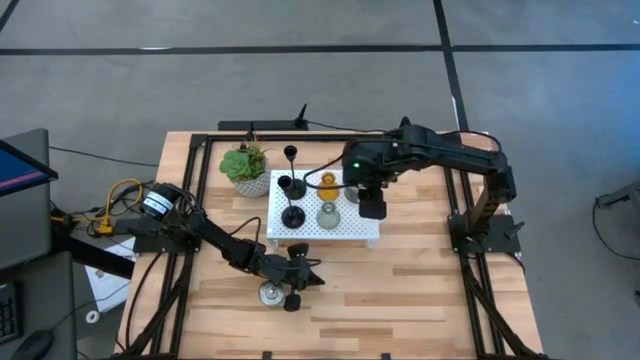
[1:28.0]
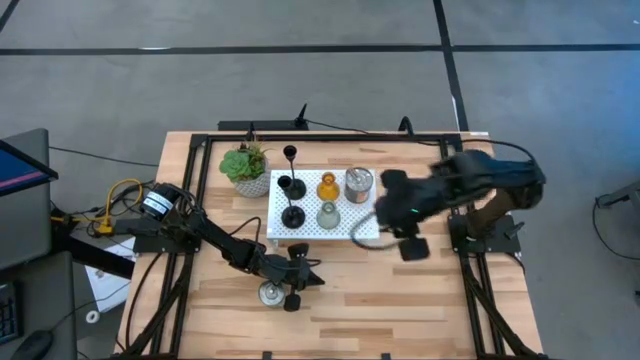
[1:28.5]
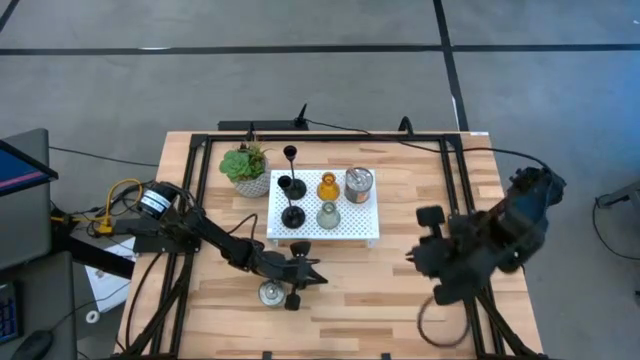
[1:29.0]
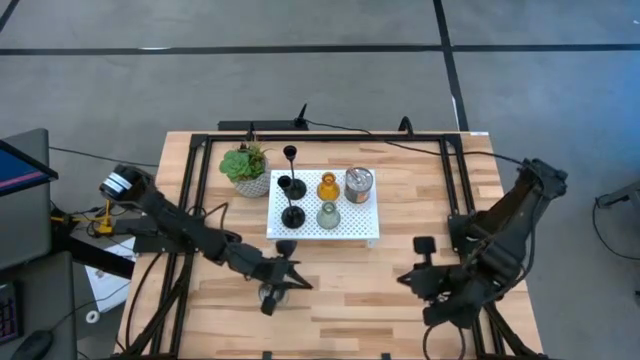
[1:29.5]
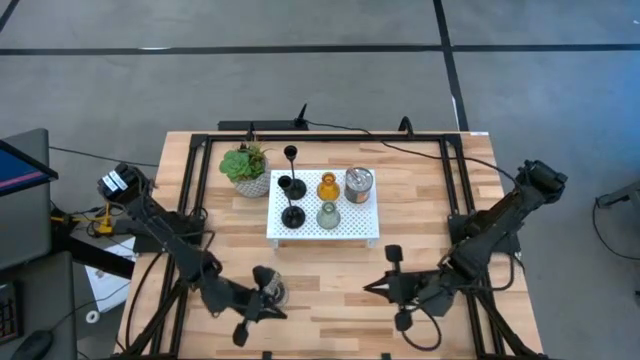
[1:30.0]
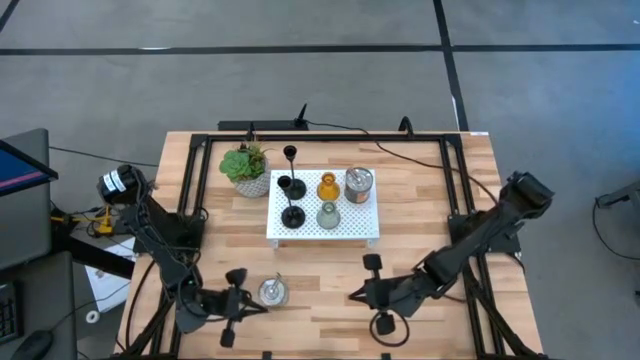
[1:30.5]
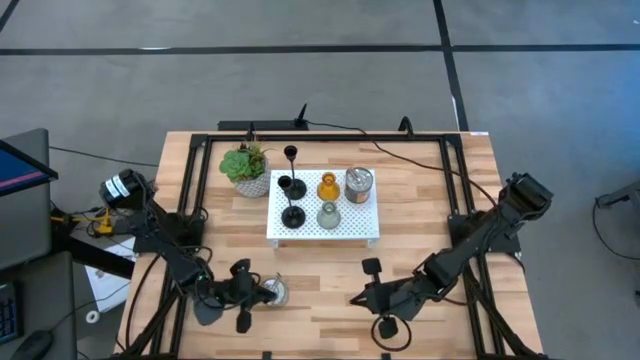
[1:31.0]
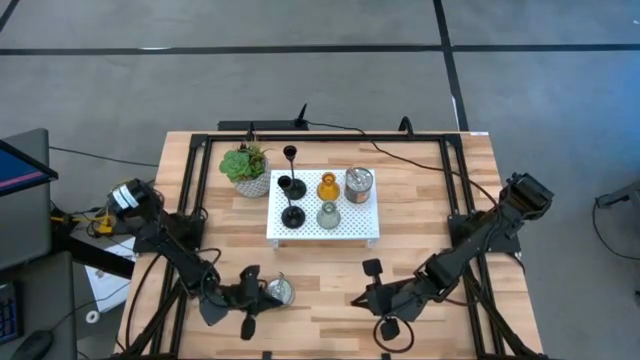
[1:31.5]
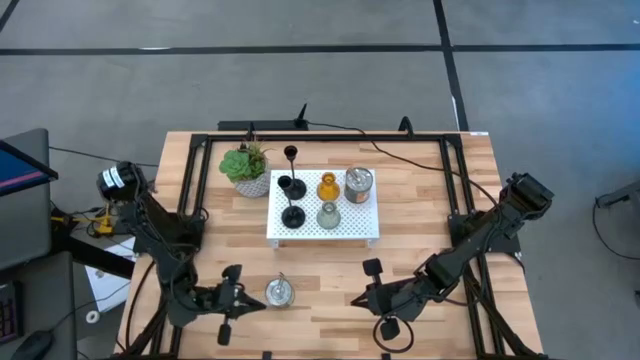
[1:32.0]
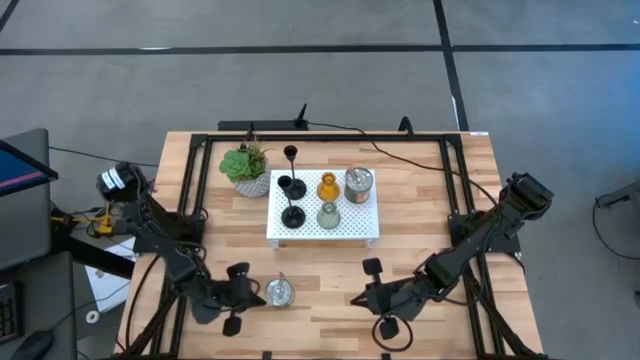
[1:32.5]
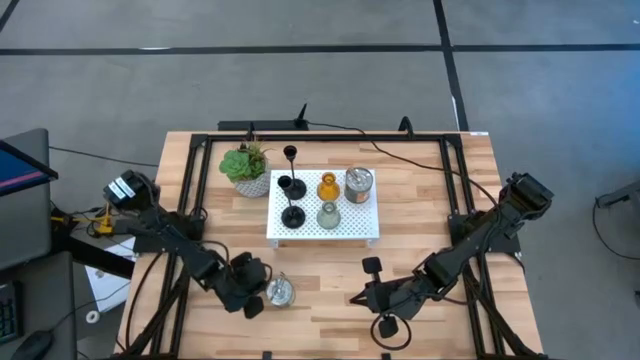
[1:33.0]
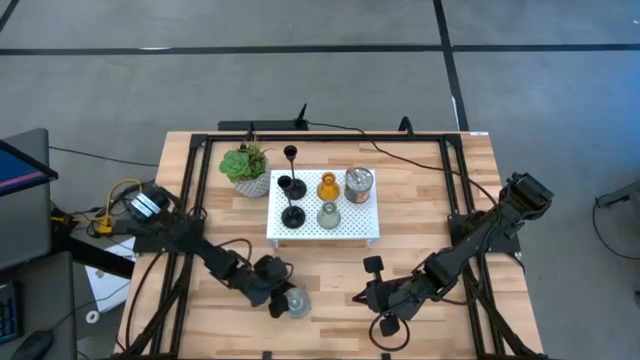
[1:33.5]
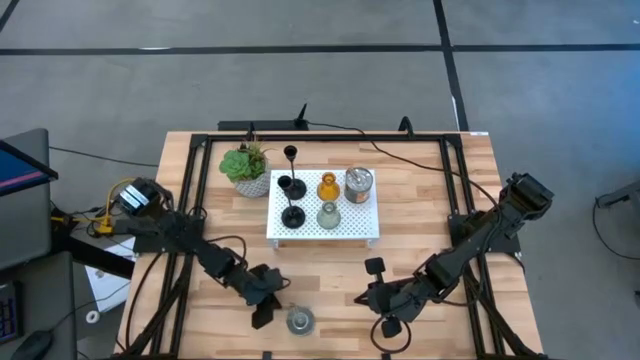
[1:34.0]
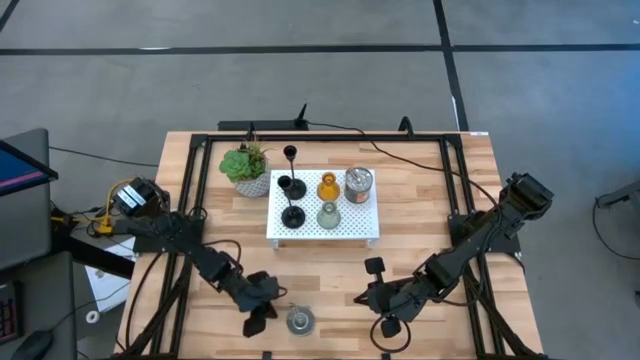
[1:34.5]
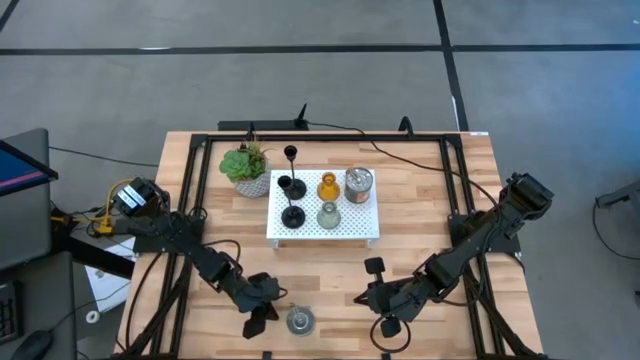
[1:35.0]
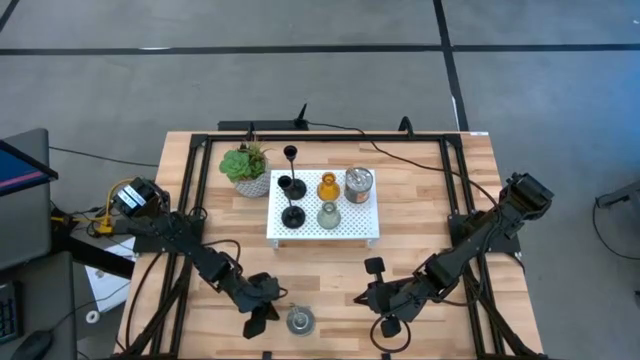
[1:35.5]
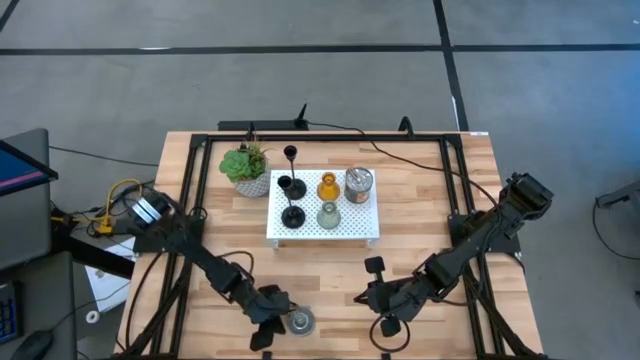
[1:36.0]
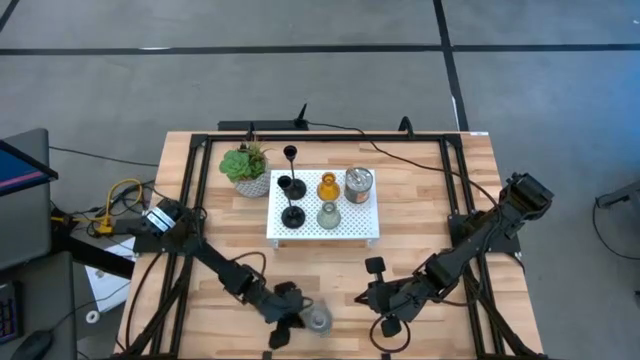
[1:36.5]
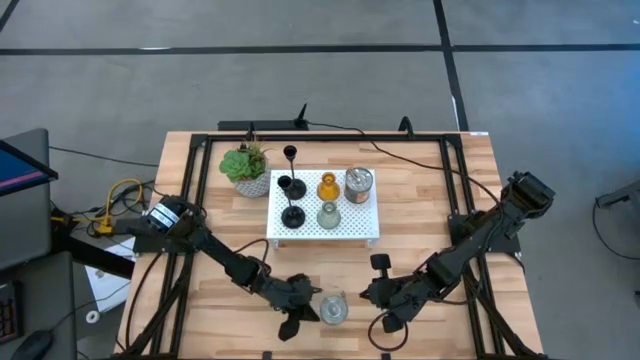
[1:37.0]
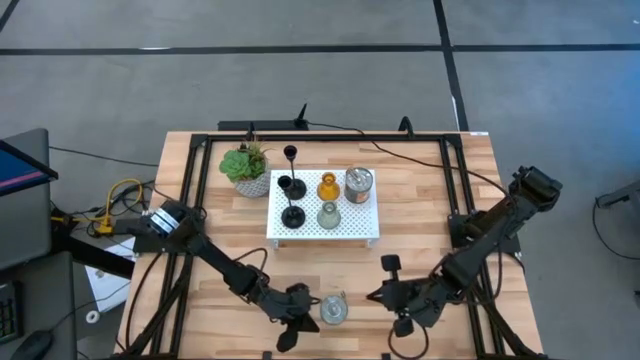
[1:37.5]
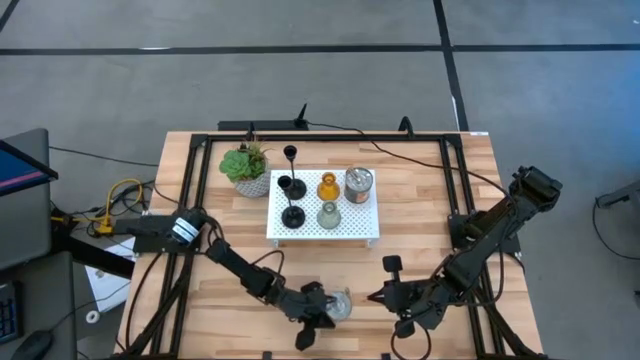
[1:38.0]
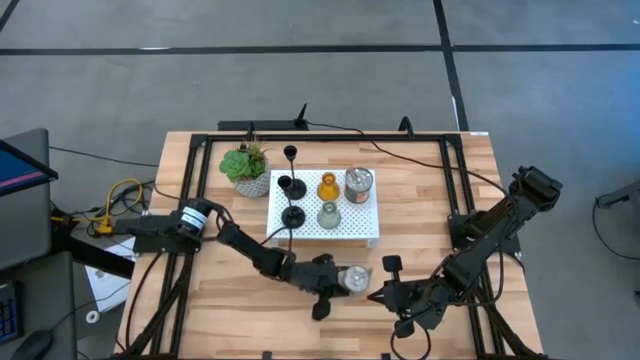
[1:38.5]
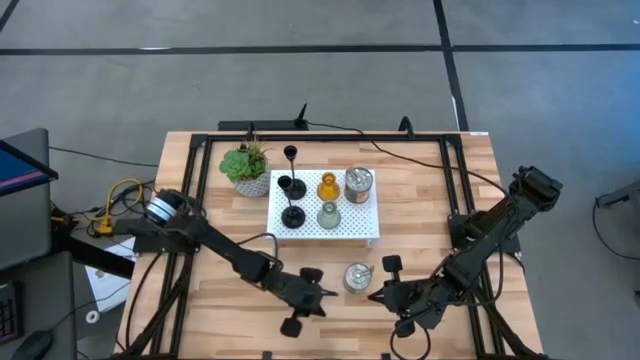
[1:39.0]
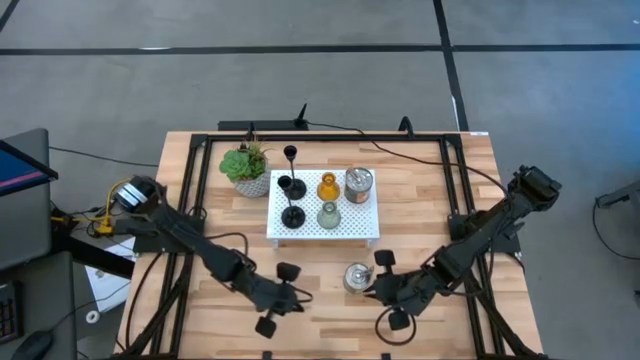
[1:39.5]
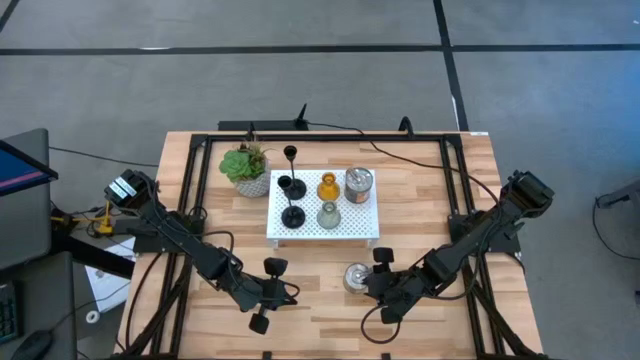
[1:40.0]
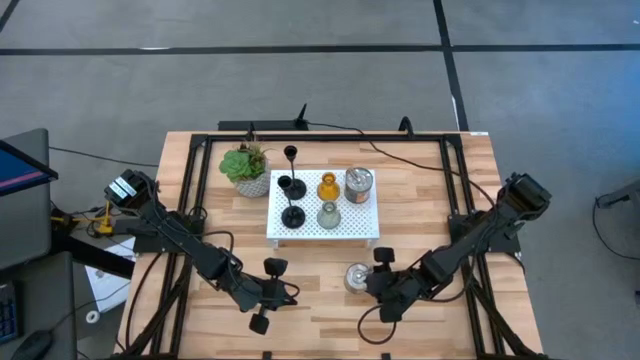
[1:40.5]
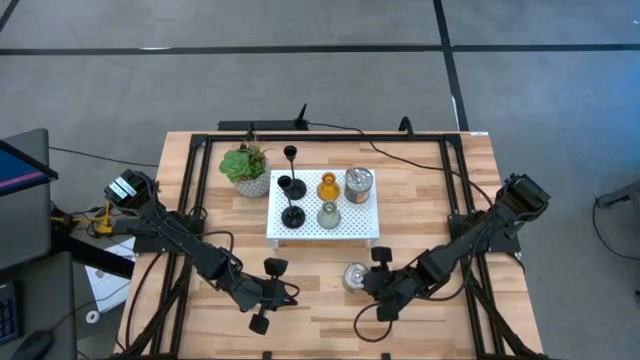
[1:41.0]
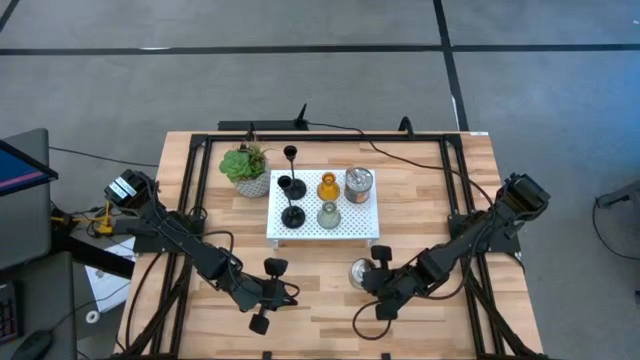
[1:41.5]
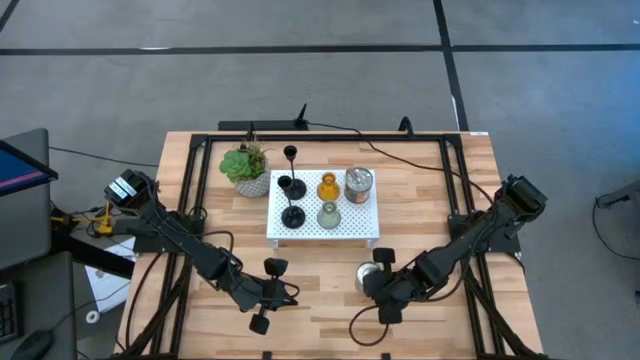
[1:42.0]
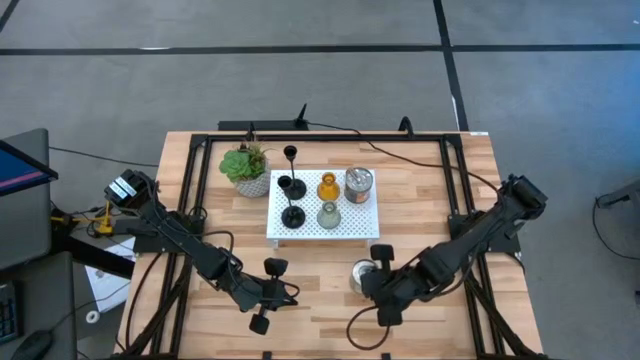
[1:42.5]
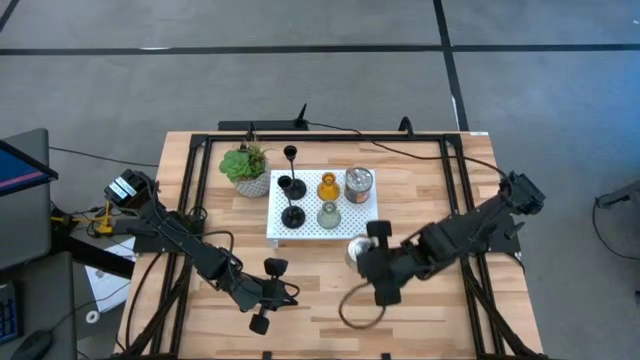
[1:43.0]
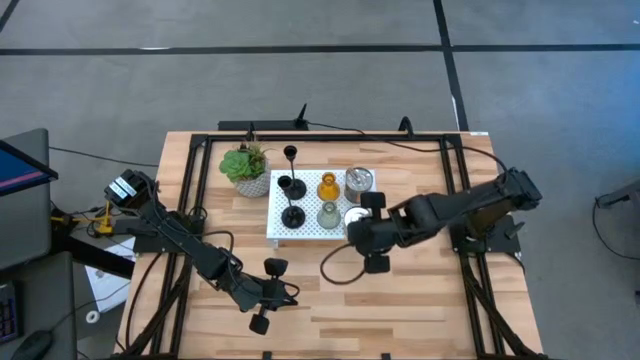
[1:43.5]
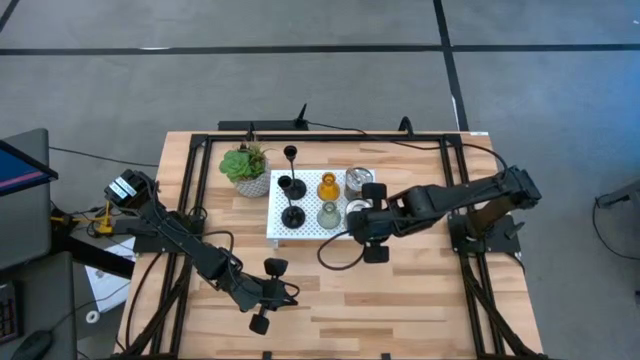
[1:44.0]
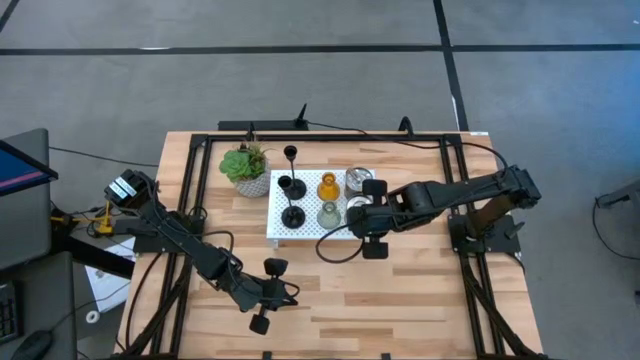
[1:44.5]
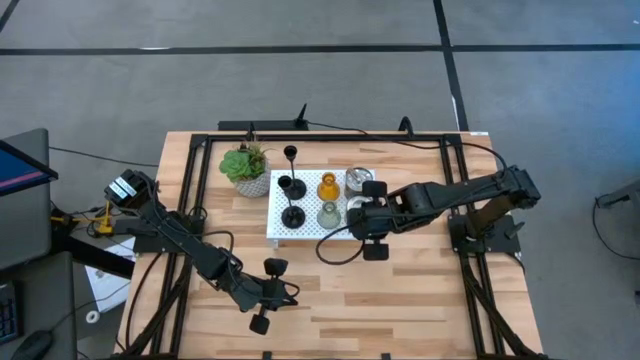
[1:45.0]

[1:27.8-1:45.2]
Task: Pick & Place candle stick holders
Align the green scented candle with the orange scented candle on the shelf
